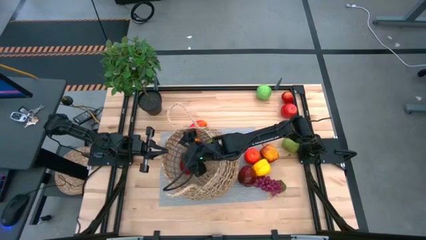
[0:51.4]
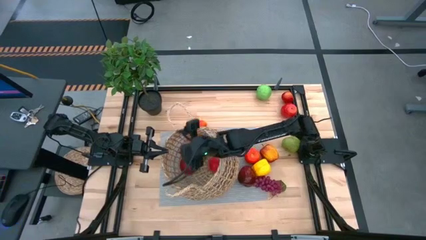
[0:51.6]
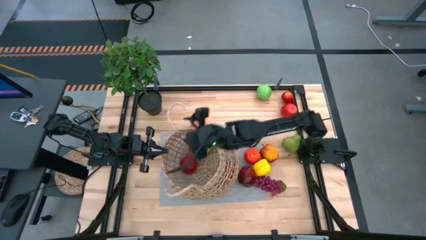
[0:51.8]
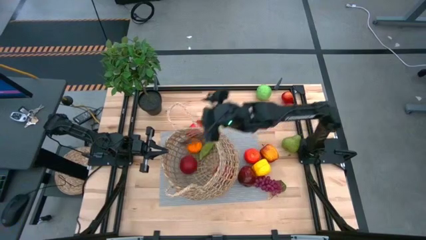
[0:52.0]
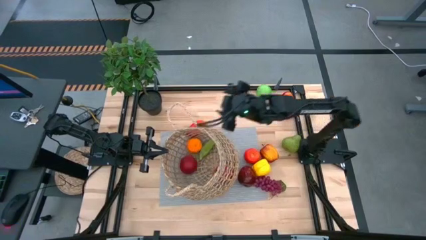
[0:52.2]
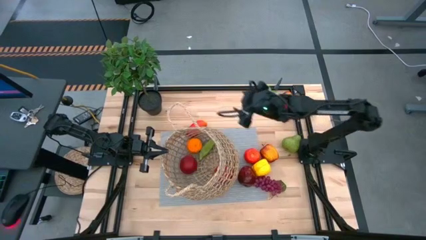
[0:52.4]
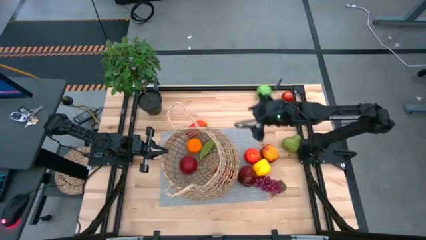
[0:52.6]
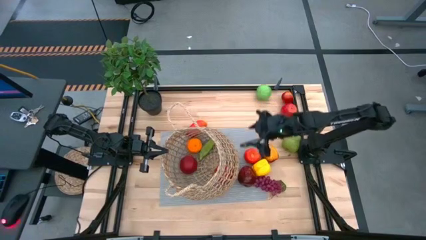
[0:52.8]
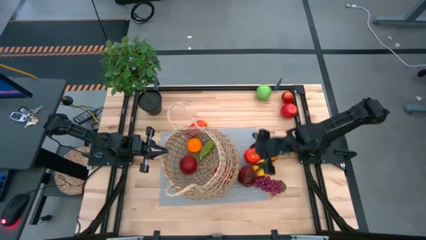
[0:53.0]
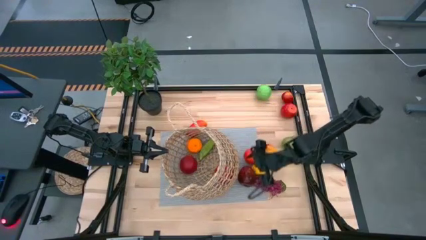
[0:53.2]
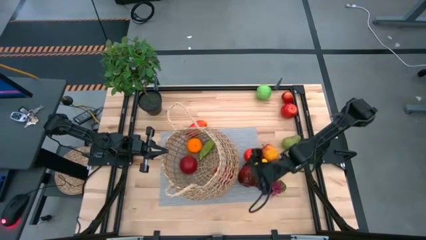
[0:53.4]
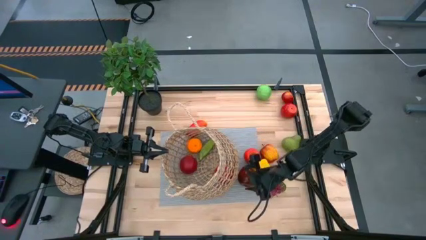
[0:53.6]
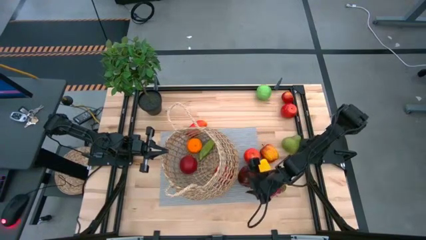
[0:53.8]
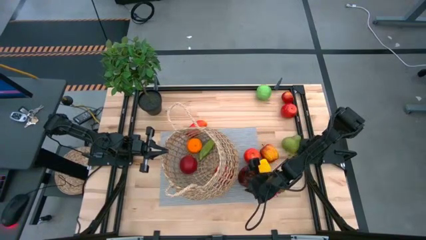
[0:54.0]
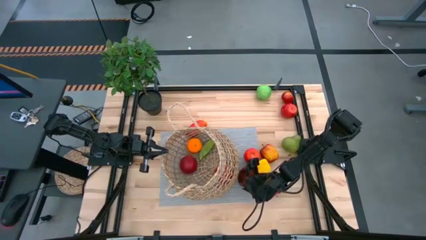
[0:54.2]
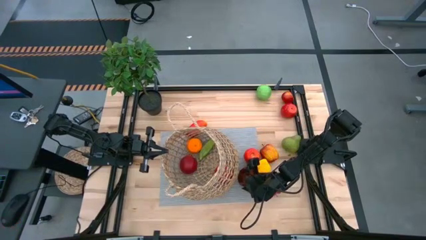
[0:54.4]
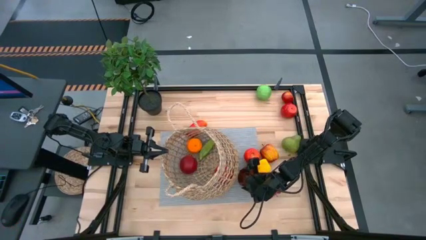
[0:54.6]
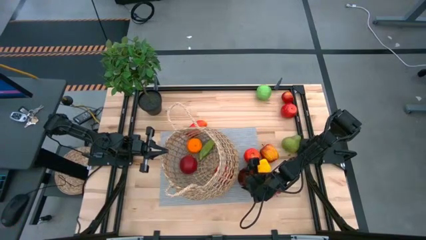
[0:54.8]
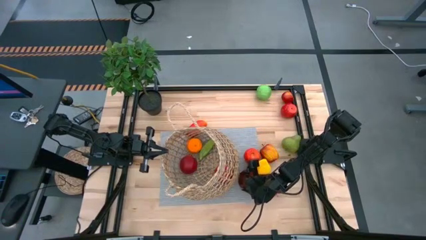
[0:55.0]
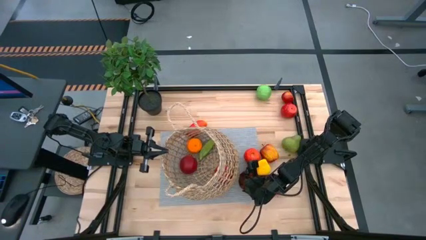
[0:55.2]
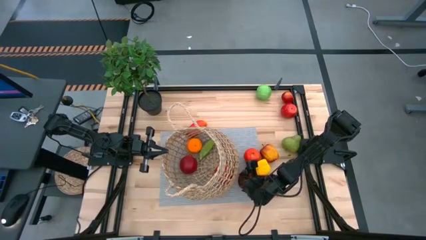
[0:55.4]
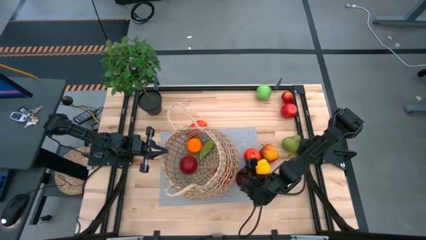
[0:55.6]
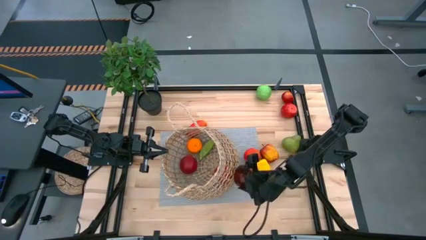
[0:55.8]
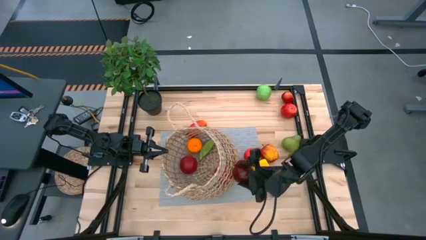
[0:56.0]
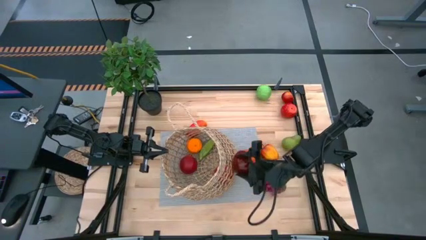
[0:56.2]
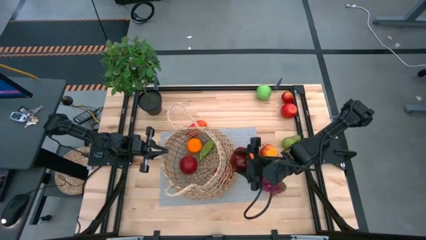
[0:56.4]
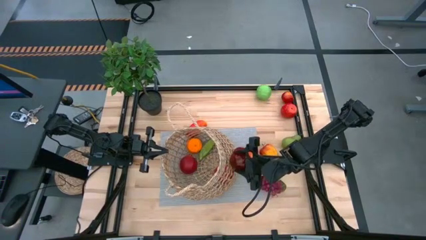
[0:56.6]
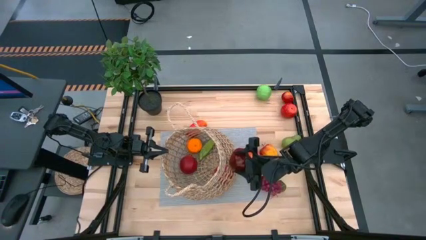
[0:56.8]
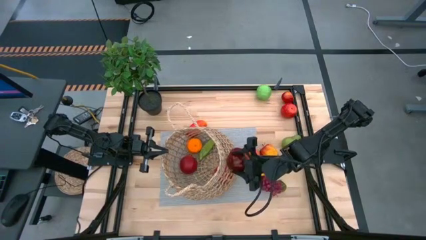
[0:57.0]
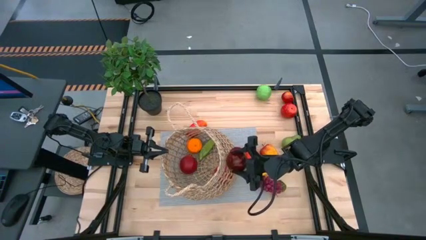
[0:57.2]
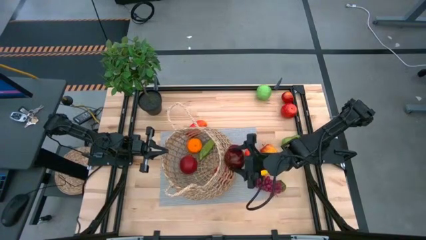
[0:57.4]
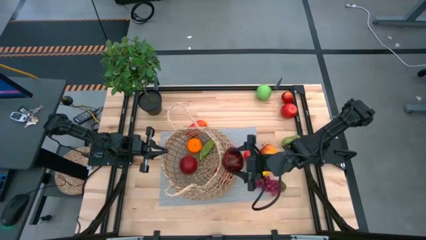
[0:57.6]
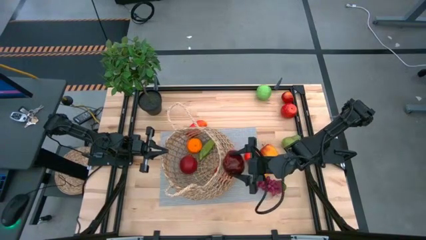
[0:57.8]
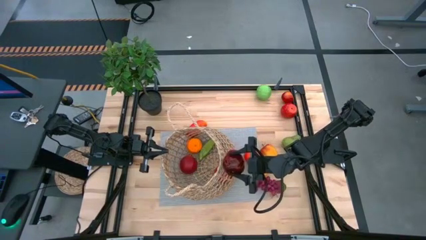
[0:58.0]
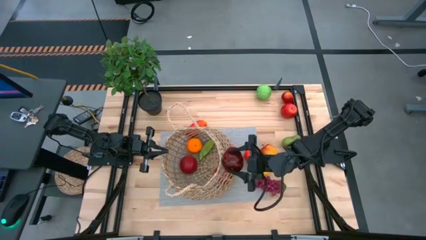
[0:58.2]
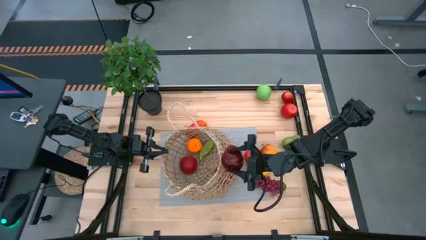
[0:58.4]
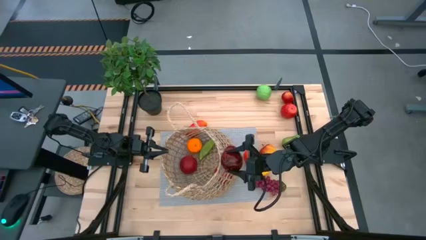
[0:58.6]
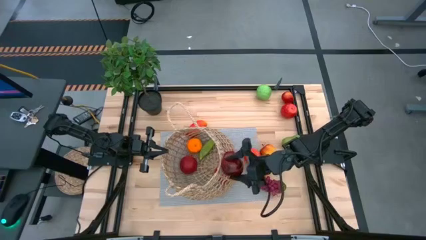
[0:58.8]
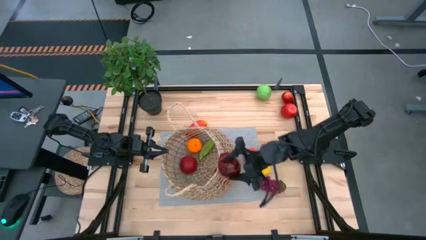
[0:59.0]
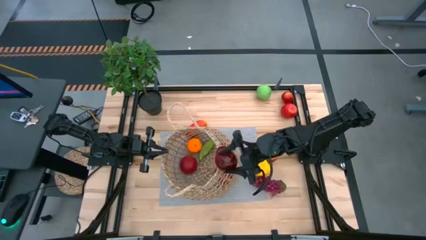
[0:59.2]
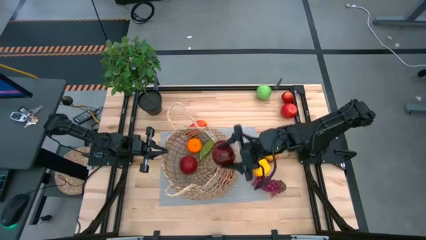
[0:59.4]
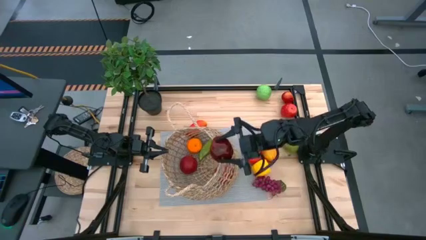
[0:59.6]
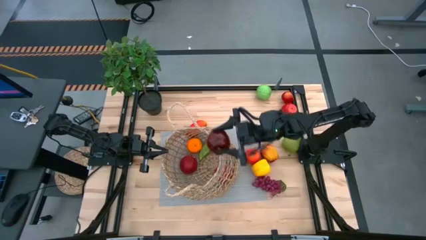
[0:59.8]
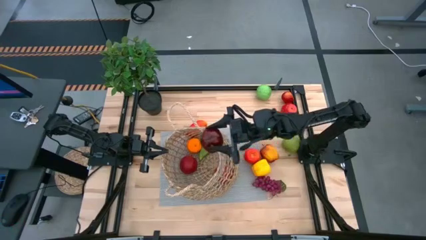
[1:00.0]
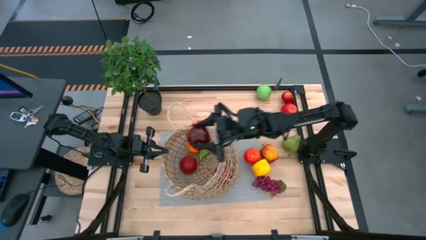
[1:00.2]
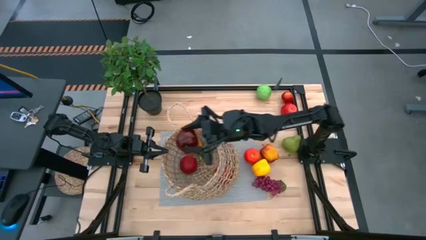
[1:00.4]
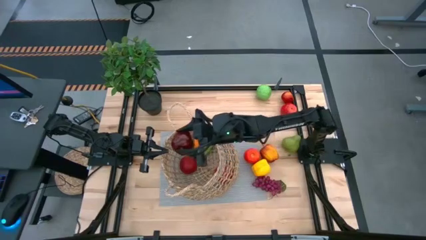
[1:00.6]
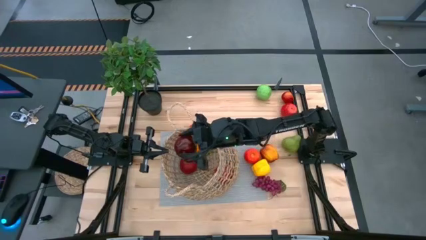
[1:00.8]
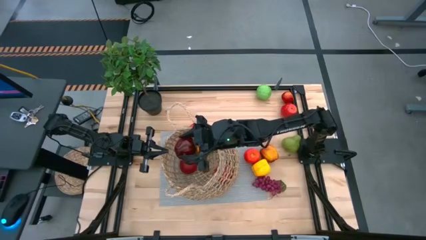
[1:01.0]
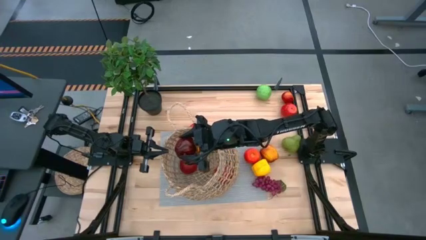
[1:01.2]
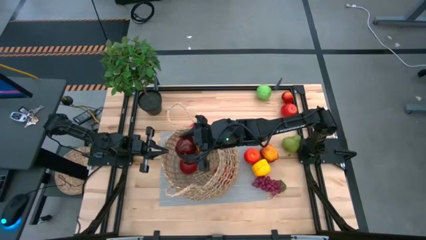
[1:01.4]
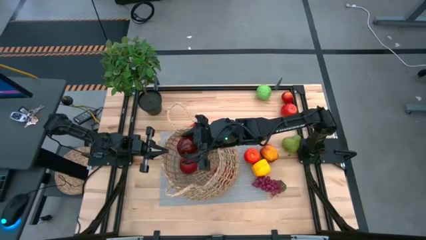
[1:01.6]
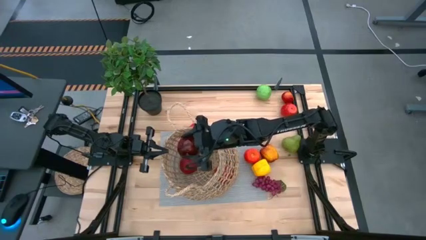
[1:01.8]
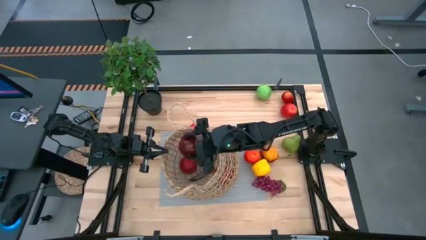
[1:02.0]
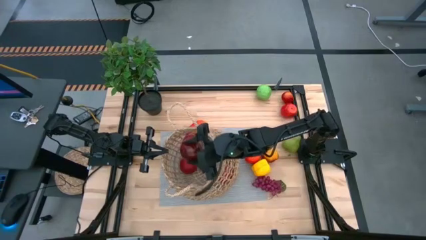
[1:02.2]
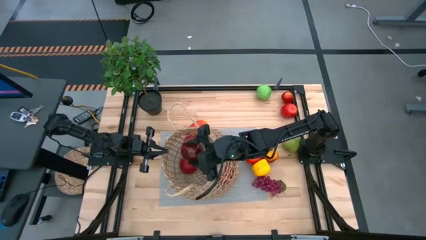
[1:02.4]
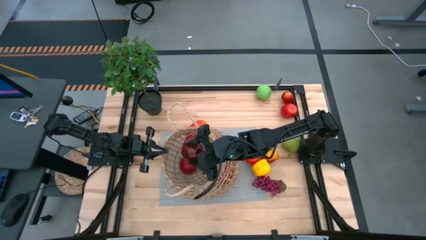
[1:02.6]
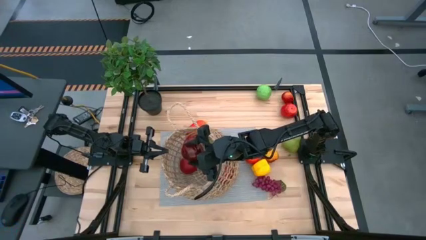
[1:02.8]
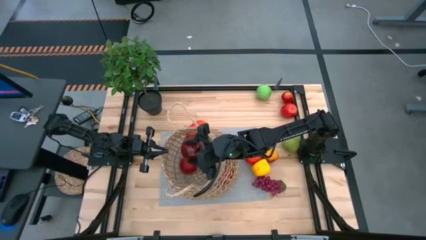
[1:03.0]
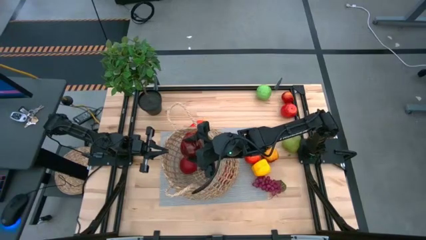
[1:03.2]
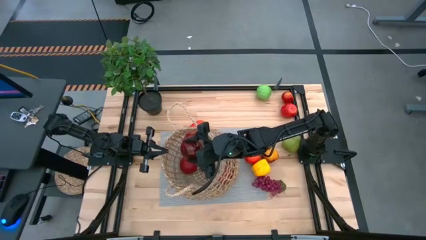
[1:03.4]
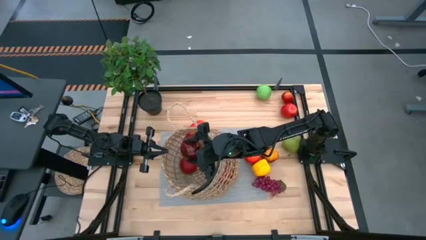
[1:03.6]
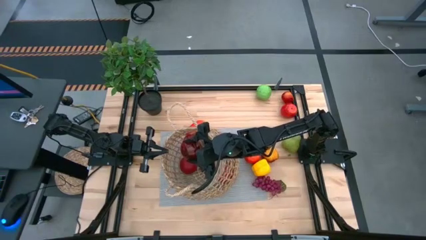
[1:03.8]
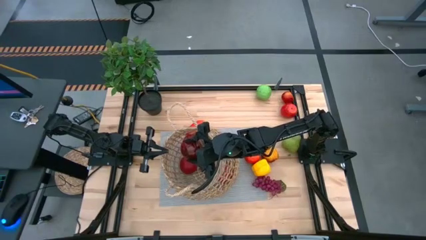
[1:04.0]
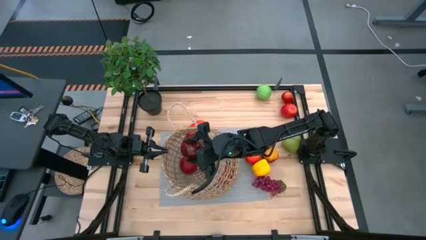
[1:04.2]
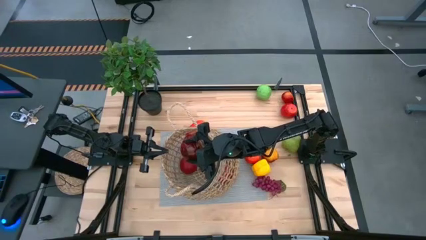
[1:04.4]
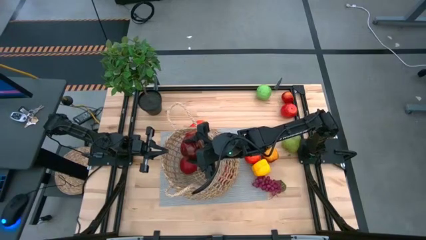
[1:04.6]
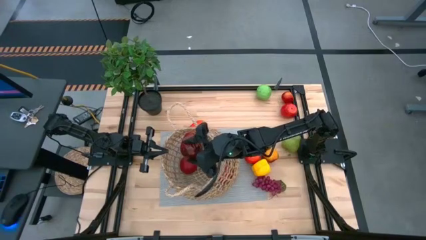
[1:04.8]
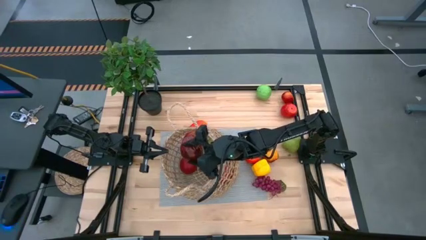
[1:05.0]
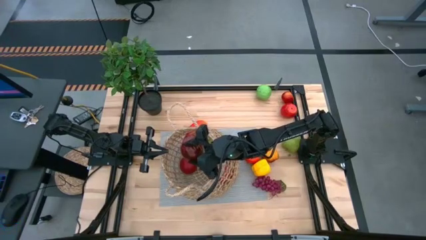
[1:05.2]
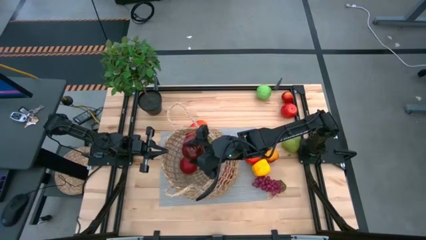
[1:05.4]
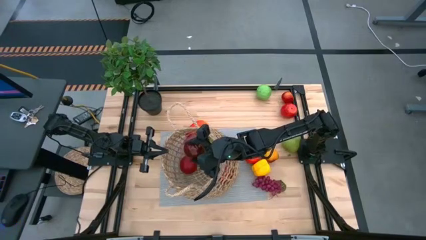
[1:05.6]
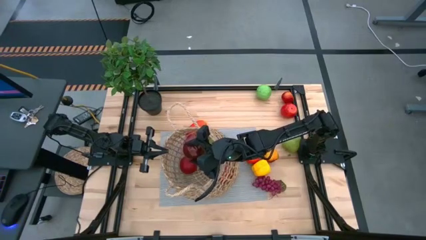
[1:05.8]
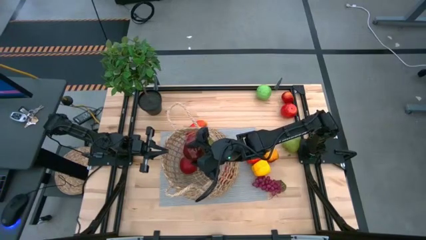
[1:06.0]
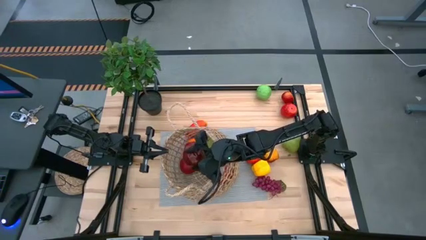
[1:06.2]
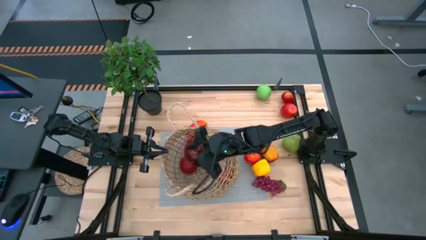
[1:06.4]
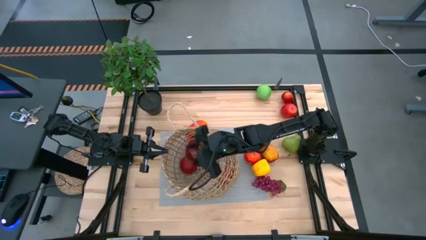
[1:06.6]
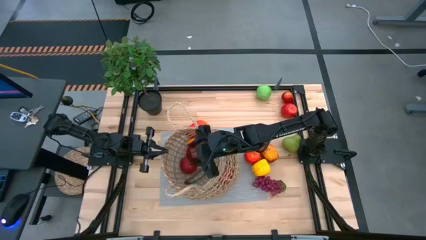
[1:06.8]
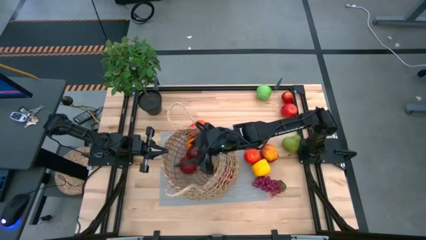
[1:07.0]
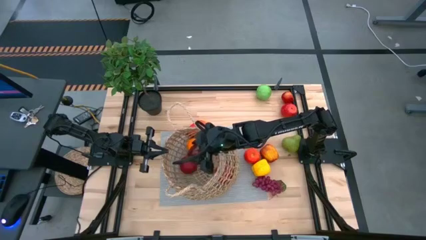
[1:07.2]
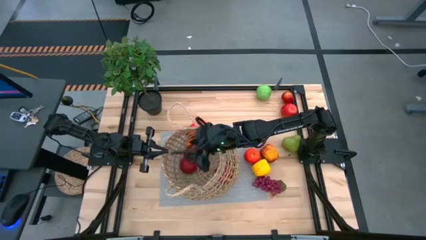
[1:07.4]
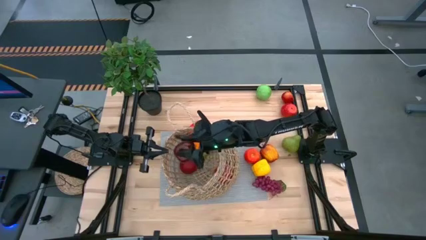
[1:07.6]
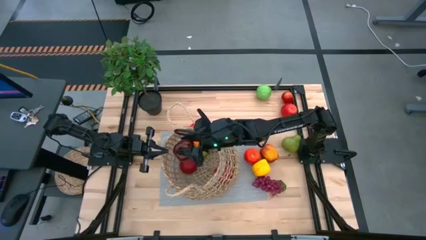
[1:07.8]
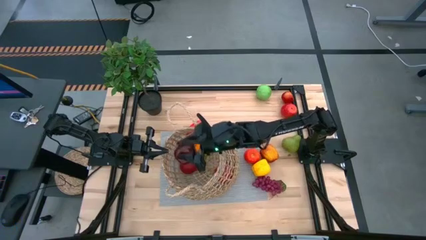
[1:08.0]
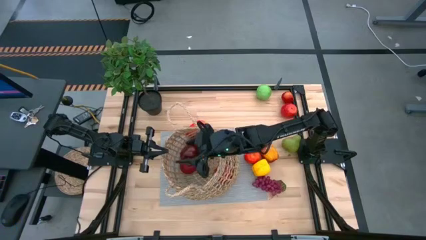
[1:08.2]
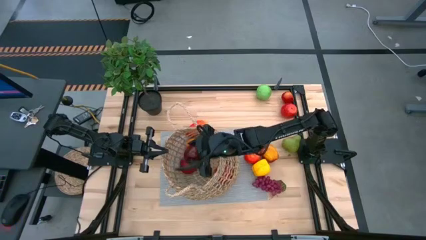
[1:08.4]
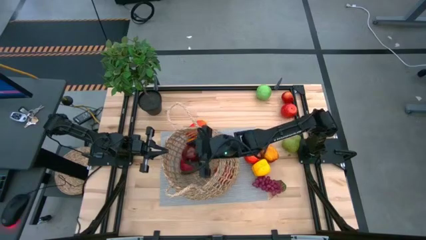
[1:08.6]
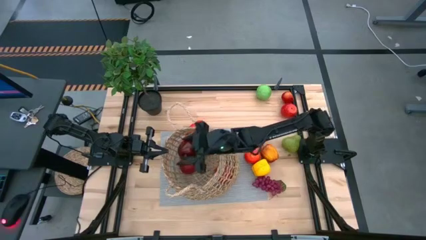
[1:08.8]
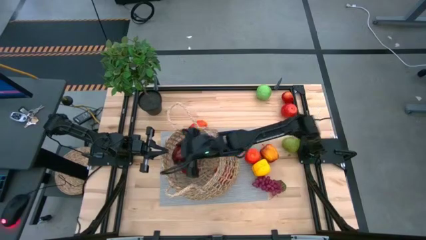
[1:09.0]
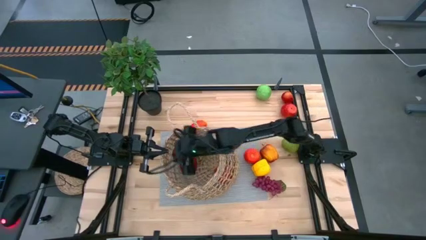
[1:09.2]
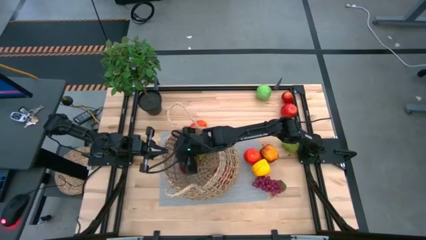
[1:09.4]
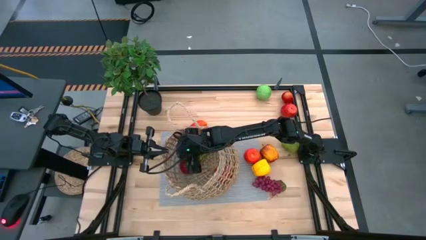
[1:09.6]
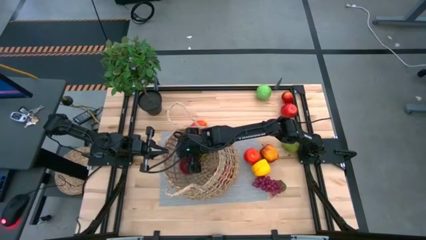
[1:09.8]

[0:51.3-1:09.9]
Task: Build produce basket
Put the red apple into the brown woven basket
